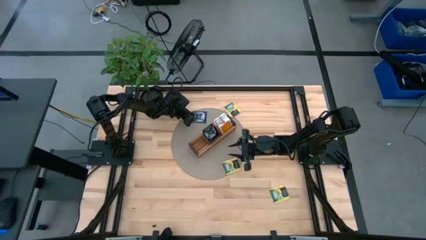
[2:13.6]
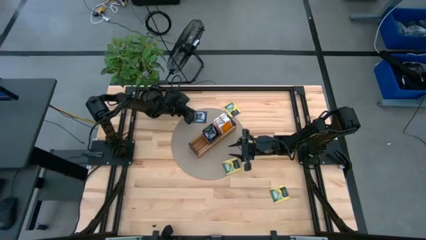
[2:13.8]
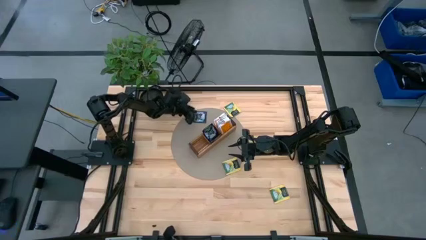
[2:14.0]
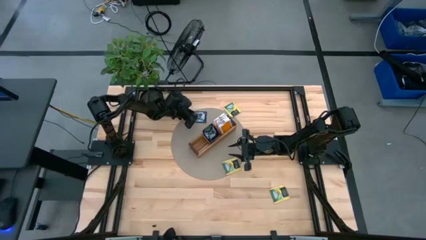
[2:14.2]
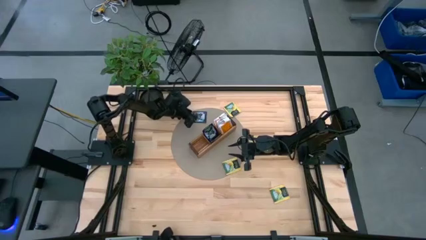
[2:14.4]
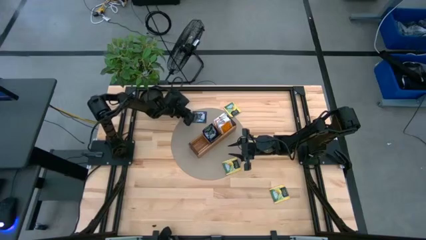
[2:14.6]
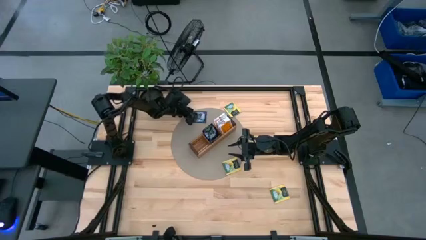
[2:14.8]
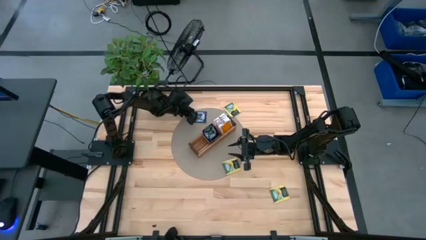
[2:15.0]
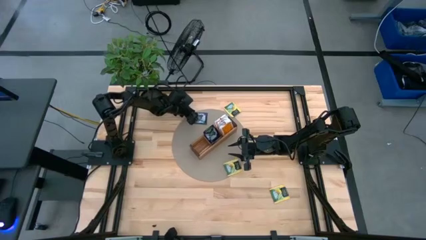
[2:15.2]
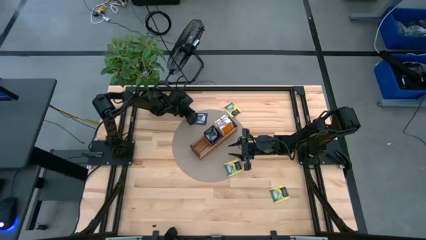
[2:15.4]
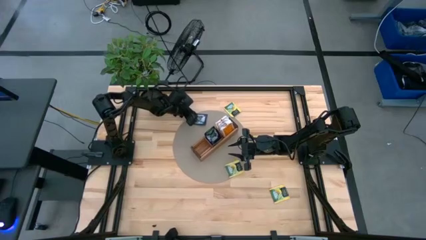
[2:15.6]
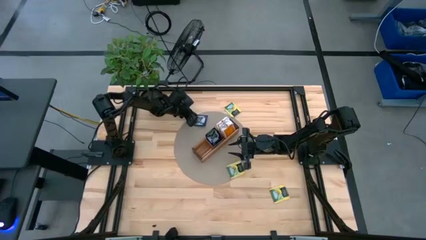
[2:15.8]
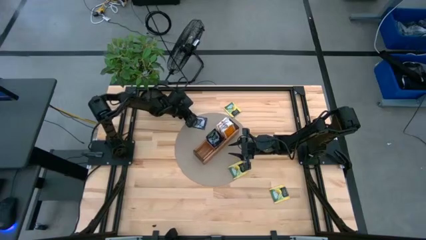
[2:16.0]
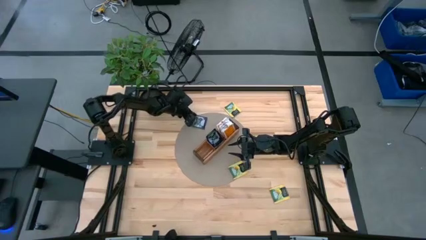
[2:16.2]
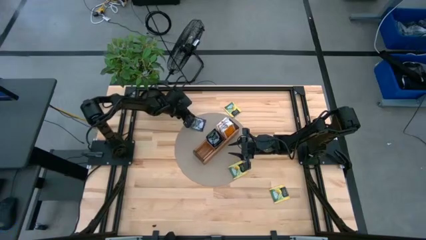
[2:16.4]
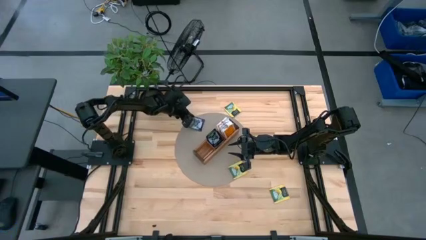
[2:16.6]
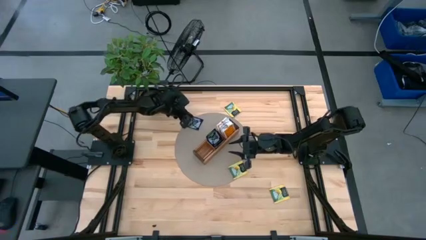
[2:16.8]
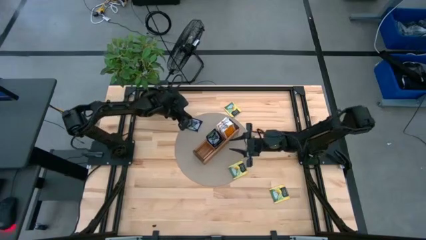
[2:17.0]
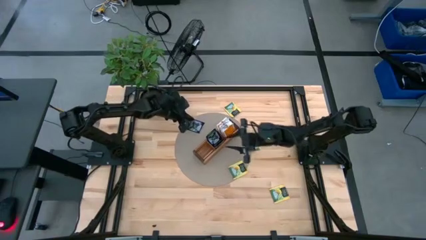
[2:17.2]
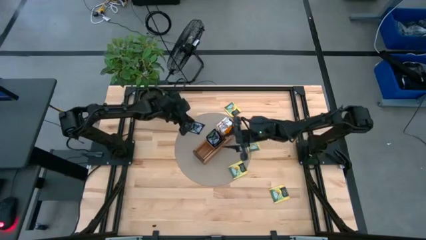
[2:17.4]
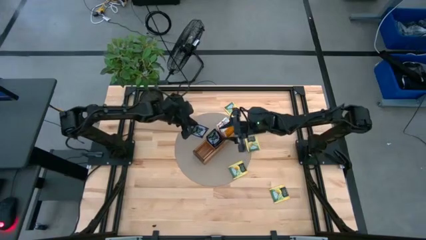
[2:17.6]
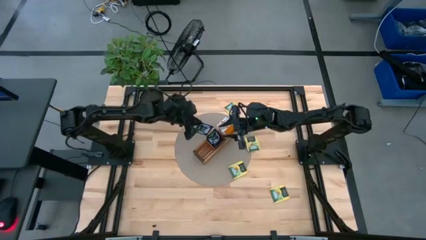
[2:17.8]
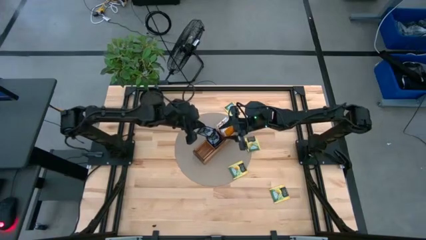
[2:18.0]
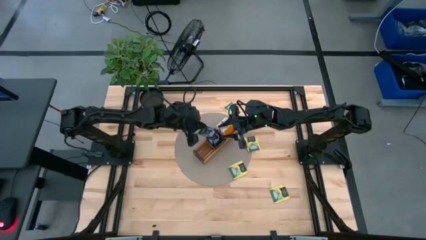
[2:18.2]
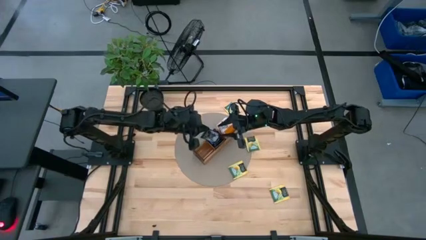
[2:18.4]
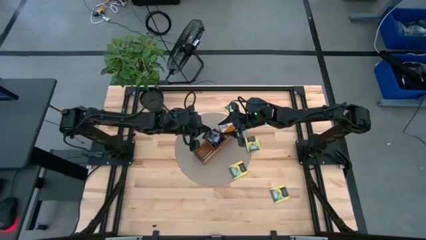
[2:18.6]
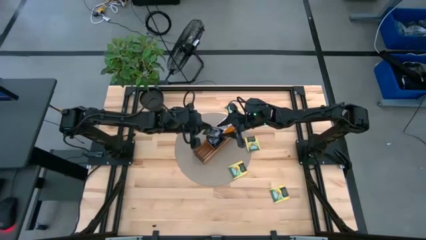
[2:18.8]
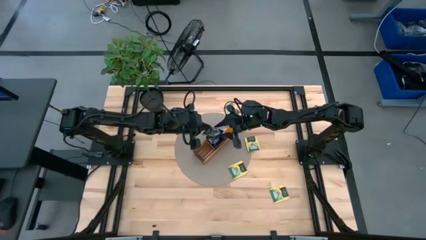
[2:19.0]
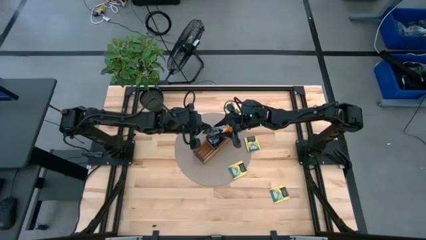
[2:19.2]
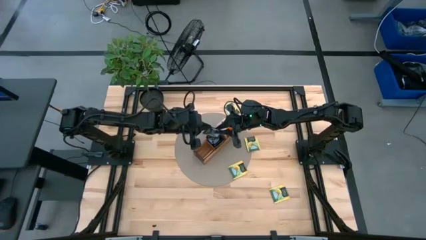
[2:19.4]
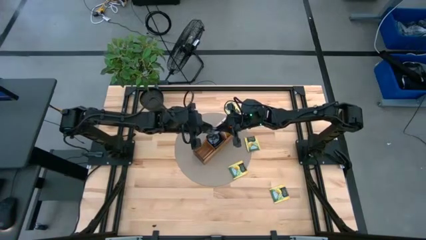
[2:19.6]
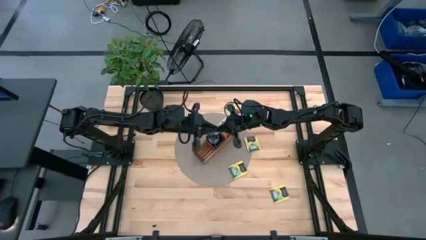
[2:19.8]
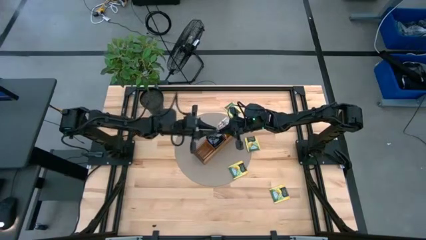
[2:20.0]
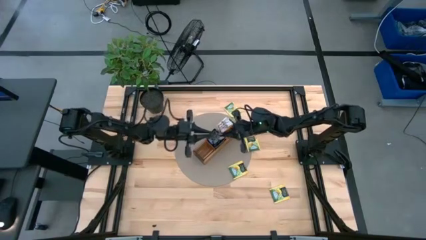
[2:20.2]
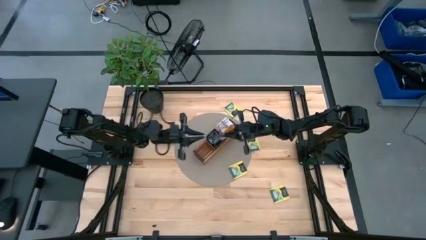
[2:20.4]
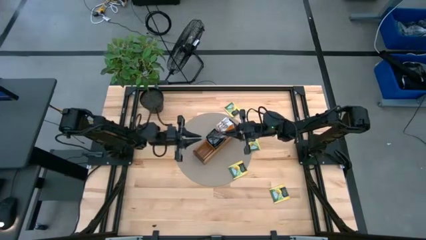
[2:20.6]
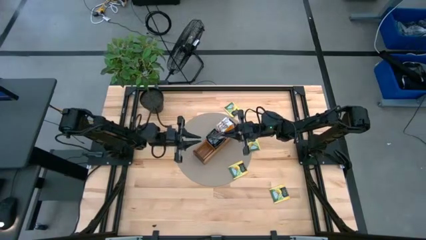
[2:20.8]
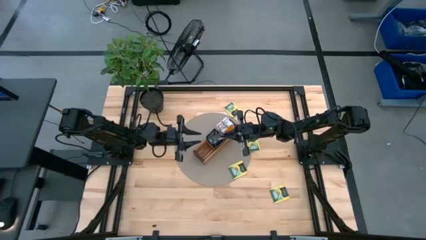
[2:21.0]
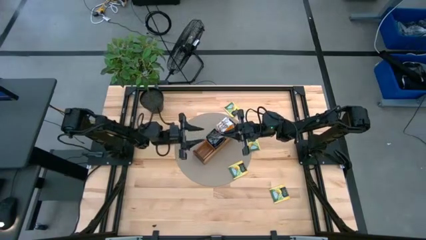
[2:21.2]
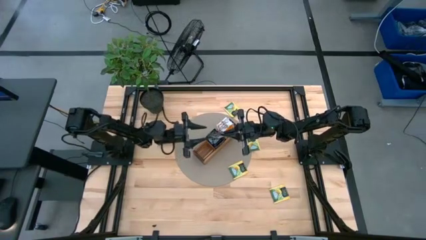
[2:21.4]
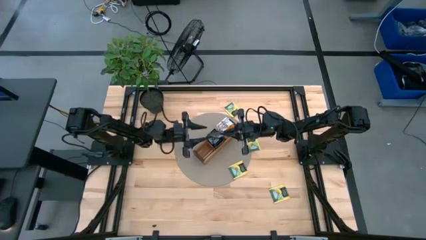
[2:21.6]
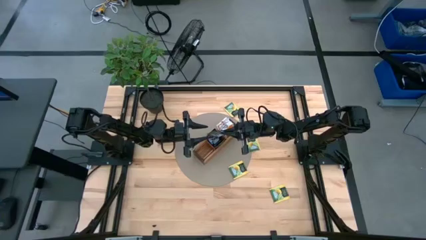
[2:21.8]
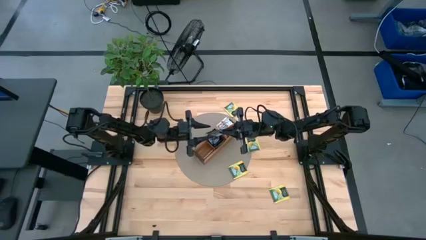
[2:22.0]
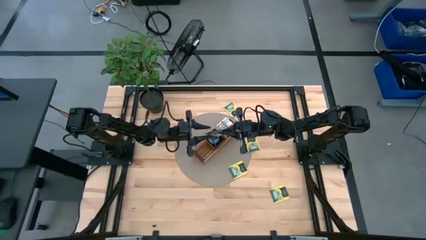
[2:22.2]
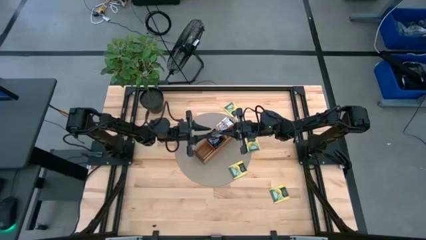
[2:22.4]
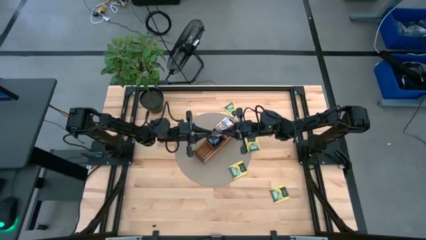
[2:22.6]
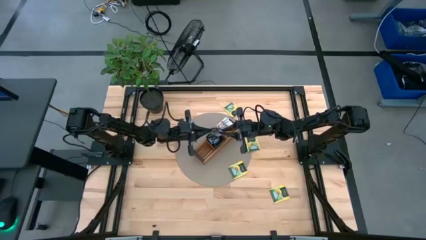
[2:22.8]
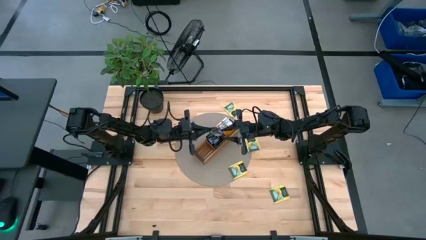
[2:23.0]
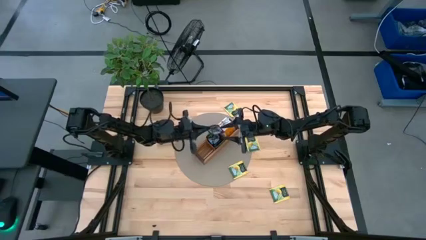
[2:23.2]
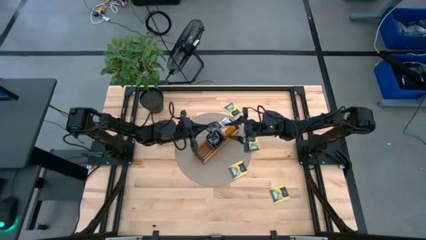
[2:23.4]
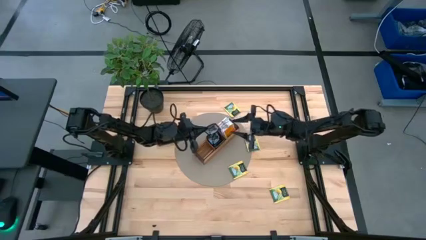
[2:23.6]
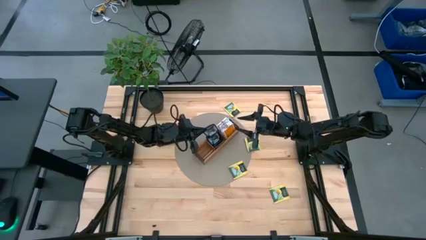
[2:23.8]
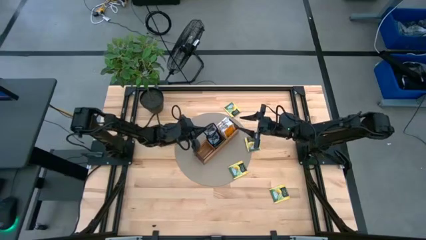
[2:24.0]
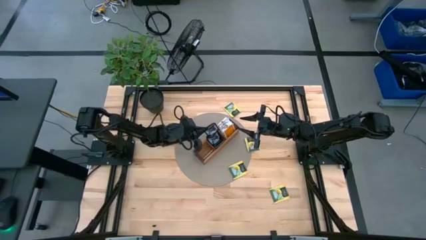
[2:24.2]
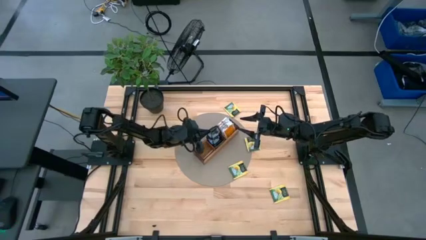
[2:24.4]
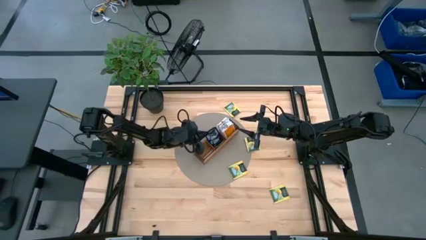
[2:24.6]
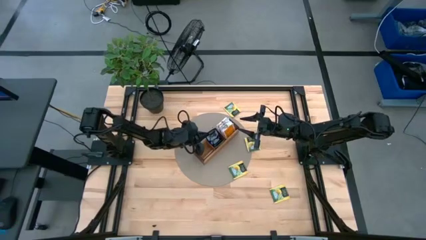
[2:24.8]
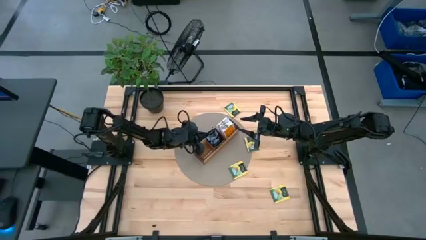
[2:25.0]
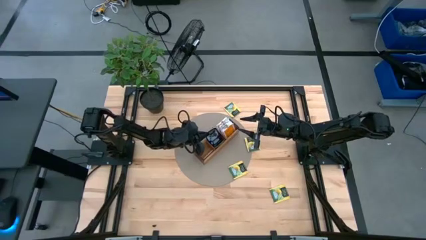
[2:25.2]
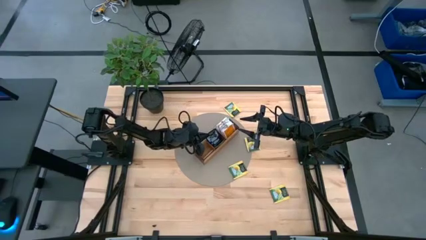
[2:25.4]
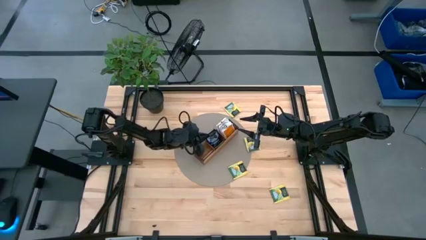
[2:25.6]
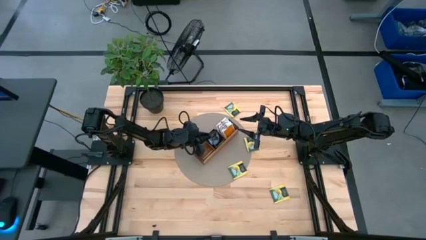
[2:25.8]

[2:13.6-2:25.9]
Task: Pick & Place Tea
Put the purple tea bag into the middle section of the wooden organizer
